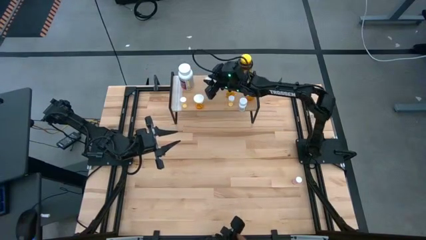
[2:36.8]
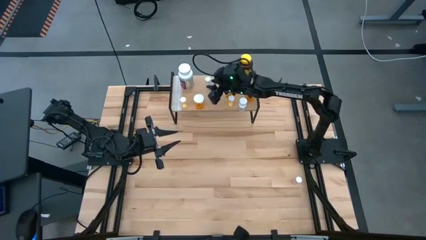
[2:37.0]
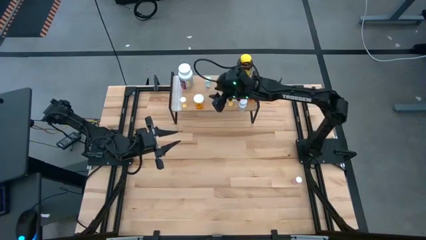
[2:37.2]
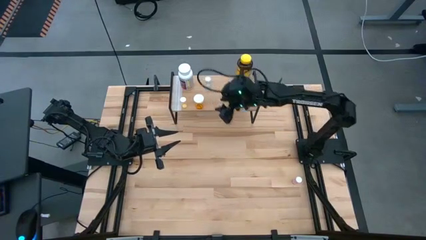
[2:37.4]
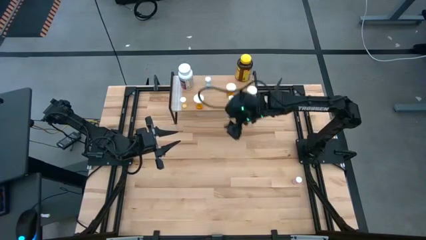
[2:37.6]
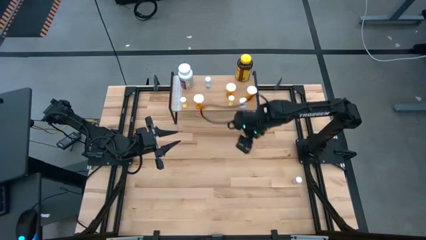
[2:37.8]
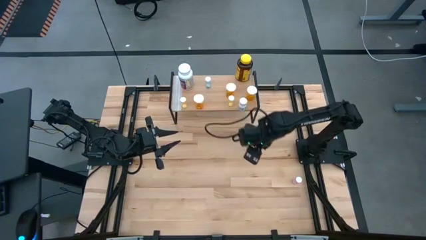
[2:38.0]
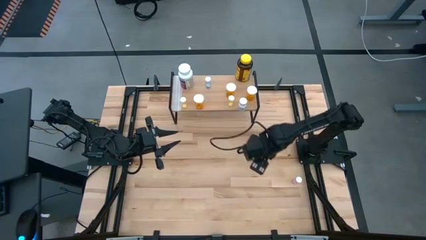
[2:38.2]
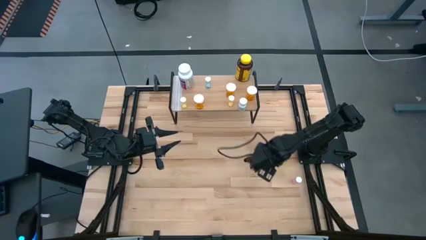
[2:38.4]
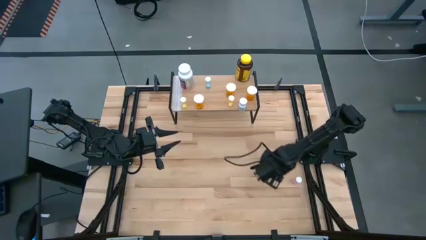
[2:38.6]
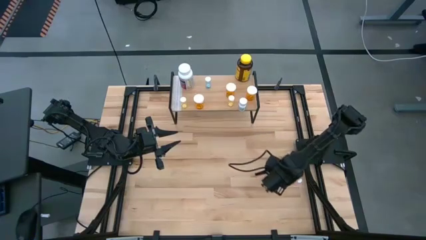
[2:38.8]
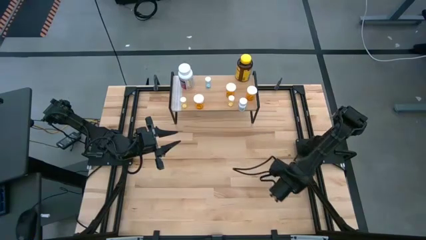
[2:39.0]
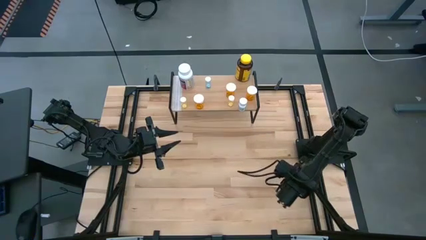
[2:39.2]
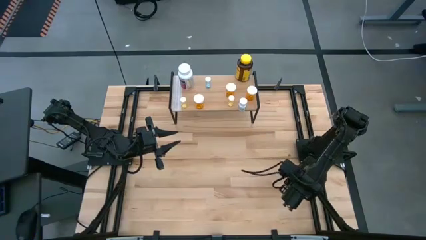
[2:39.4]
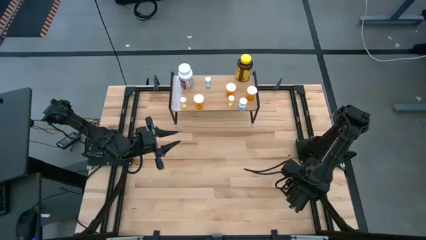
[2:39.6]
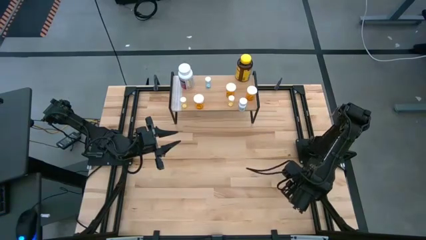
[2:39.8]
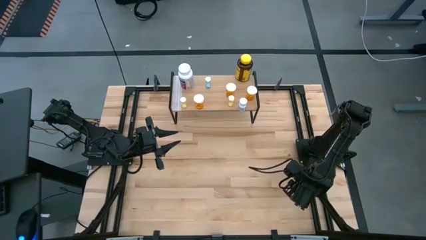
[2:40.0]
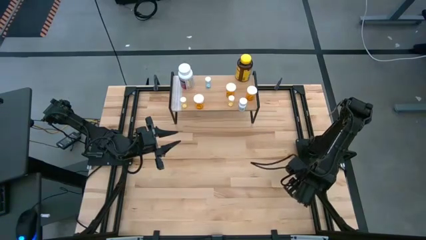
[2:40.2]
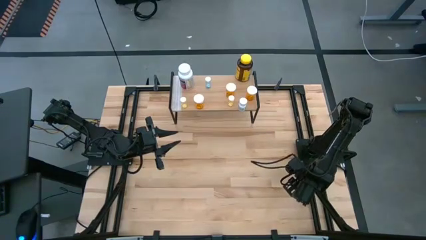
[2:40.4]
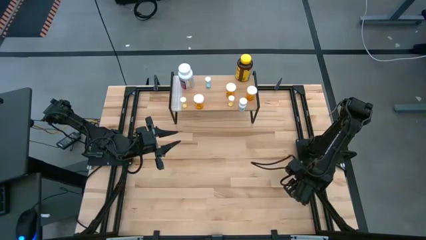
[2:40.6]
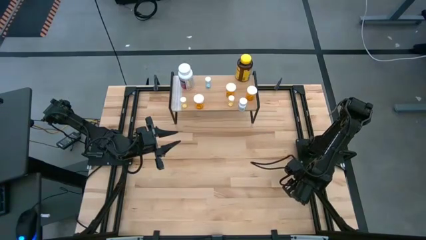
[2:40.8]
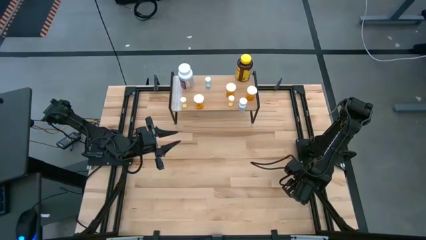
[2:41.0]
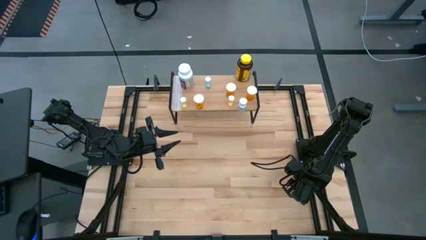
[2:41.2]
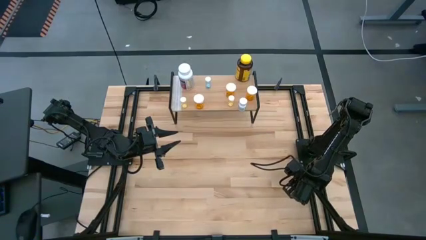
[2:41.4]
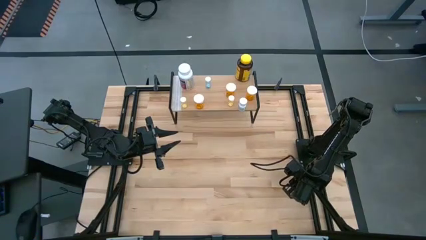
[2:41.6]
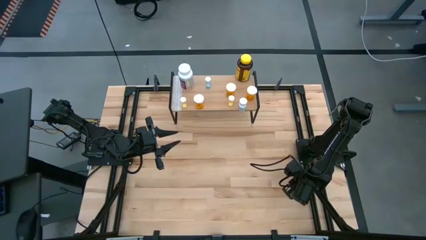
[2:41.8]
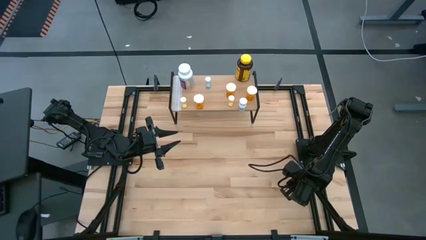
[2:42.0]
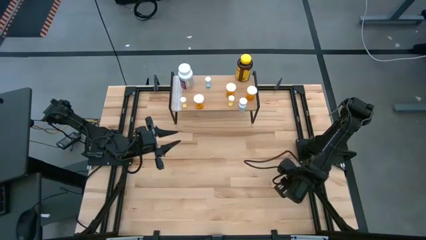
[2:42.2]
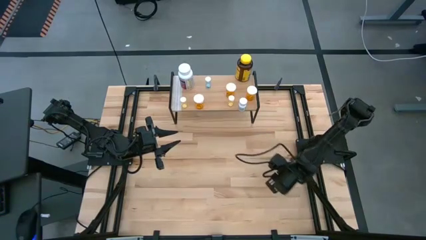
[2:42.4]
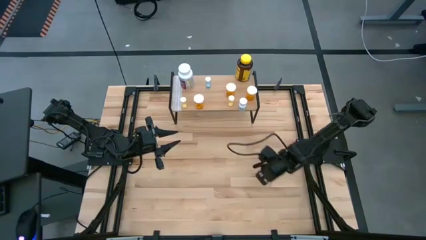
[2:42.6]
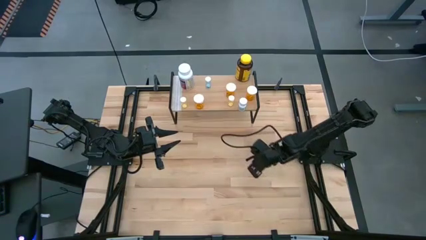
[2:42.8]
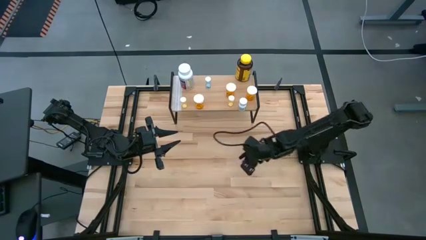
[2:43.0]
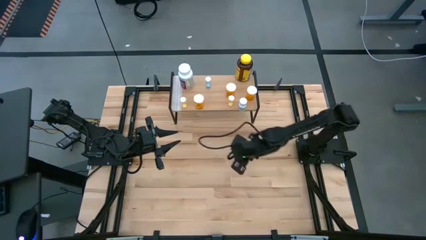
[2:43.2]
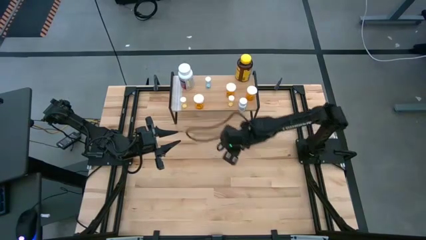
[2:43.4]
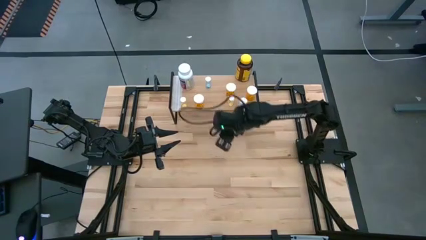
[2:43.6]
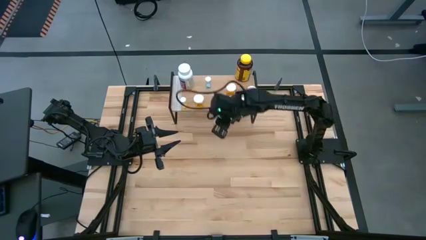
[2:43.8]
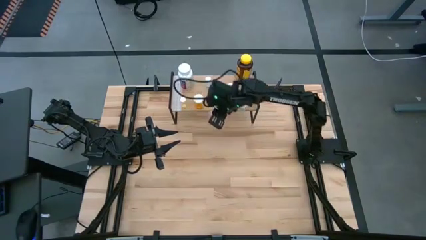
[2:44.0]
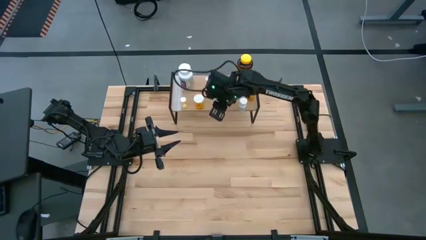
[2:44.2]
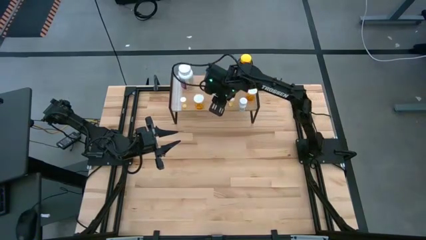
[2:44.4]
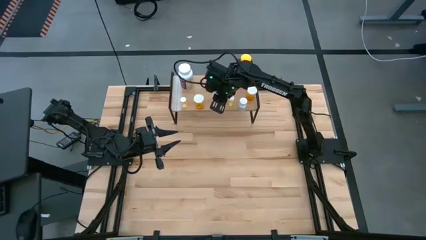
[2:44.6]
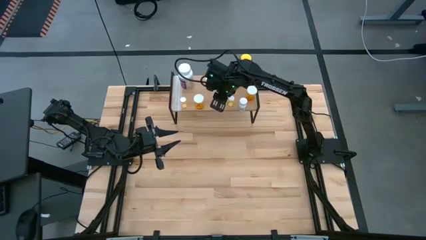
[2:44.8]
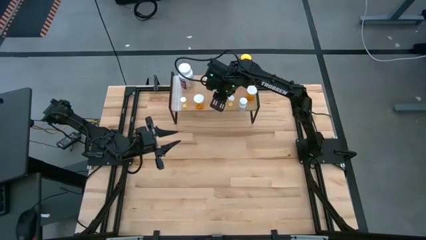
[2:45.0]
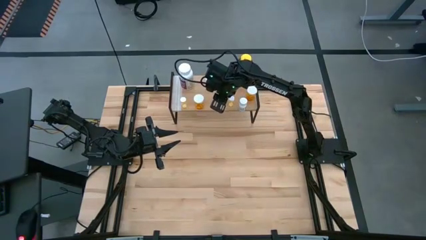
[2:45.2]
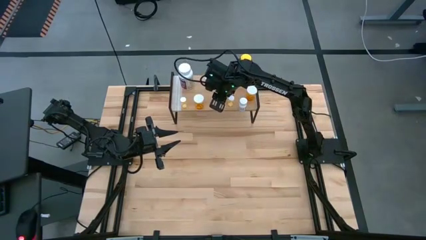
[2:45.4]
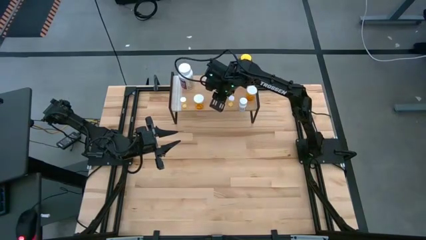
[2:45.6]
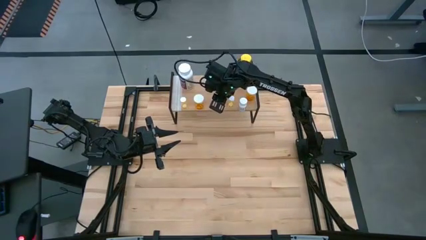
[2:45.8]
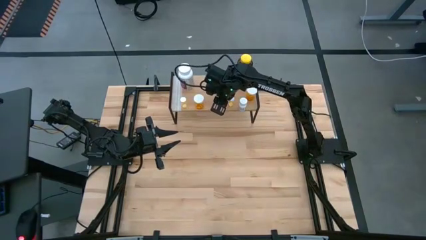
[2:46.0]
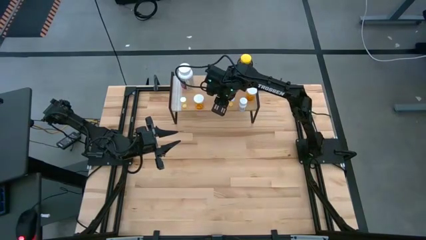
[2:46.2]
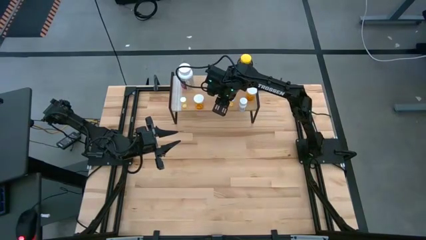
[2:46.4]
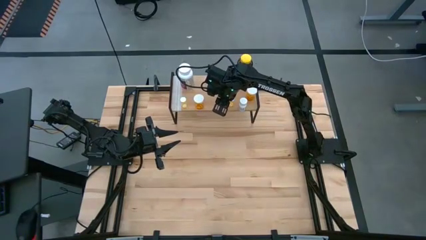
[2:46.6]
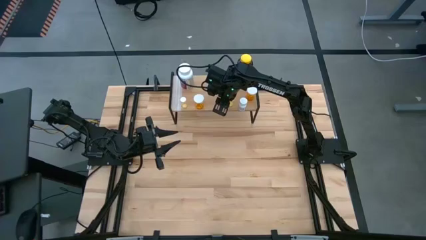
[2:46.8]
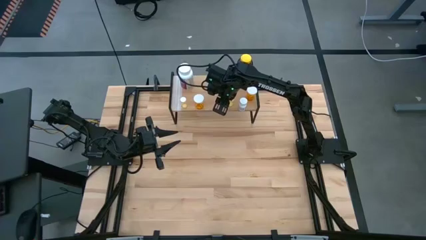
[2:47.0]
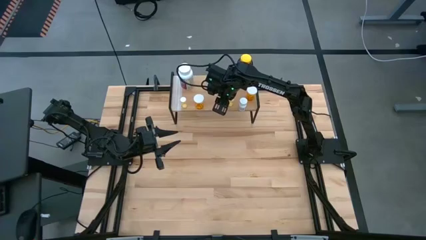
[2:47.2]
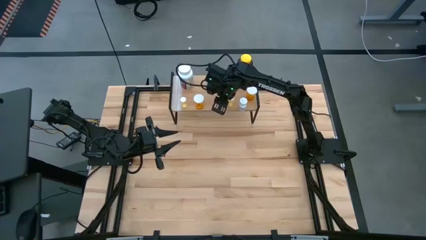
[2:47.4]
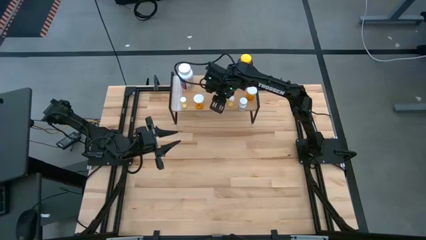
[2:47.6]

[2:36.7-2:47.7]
Task: Pick and place medicine bottles onto shelf by color
Put the small pink medicine bottle on the shelf

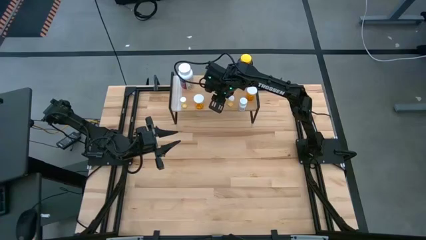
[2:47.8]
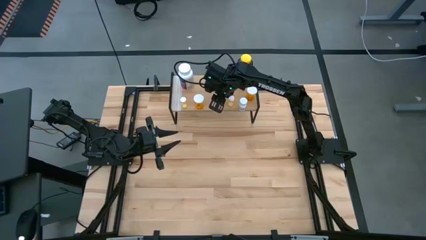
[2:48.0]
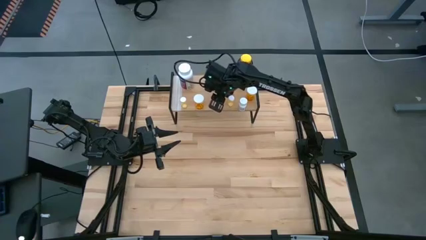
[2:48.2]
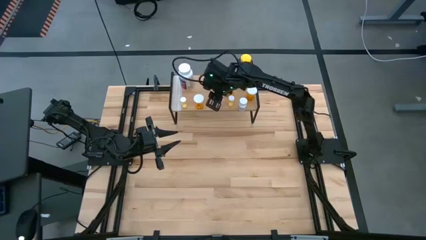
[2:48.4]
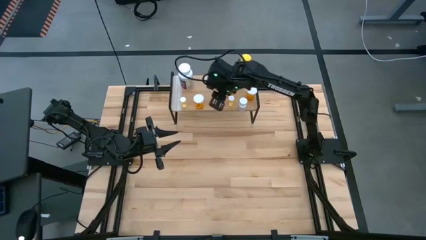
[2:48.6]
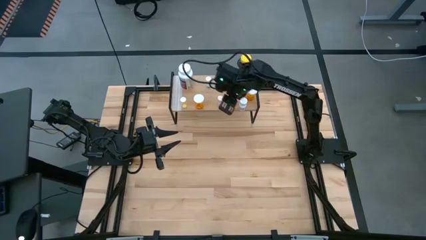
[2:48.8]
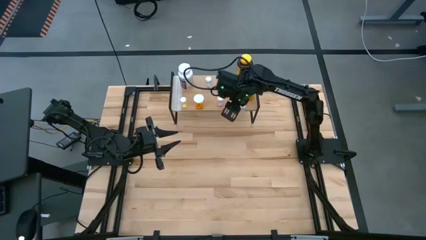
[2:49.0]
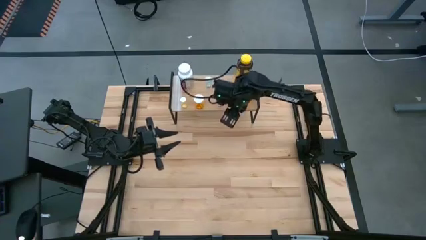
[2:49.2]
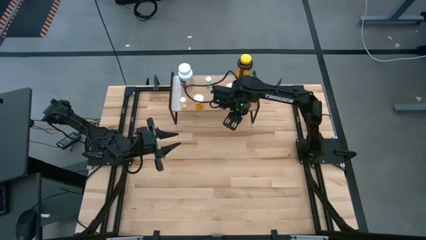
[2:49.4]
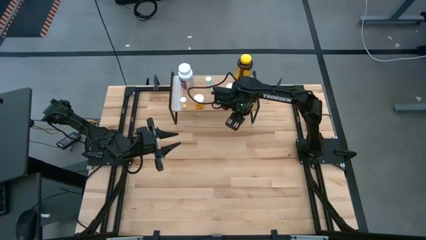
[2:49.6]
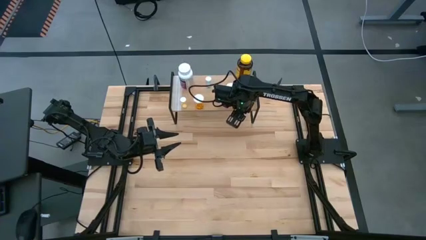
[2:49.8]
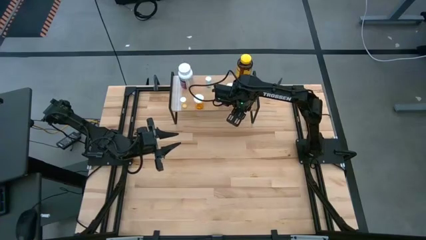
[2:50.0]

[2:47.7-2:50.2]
Adjust the small white medicine bottle on the shelf

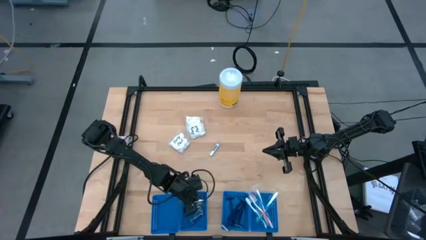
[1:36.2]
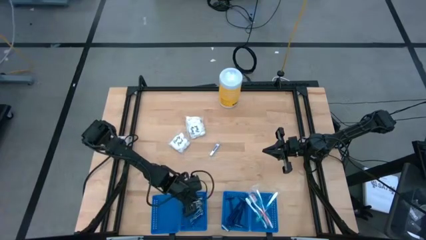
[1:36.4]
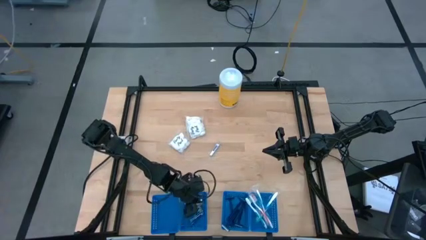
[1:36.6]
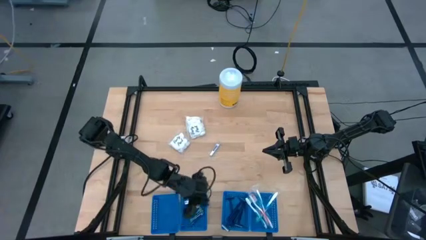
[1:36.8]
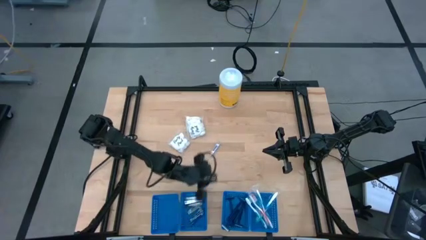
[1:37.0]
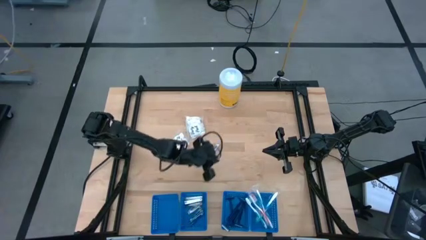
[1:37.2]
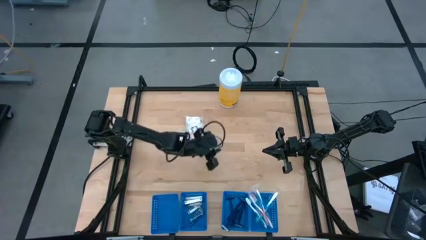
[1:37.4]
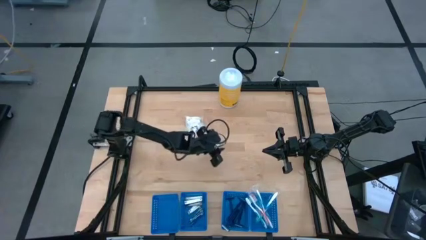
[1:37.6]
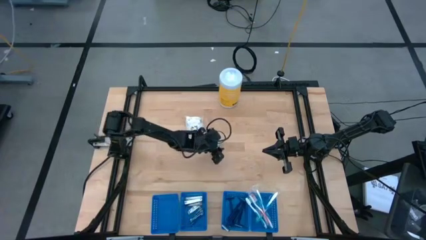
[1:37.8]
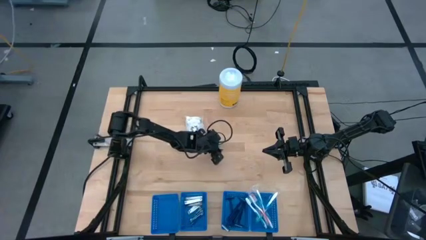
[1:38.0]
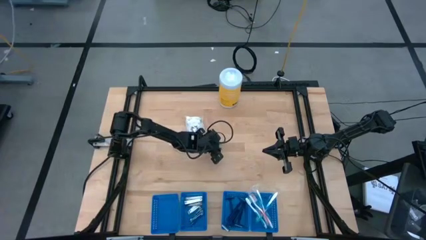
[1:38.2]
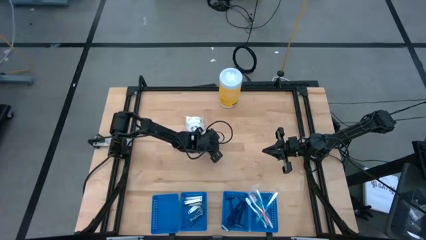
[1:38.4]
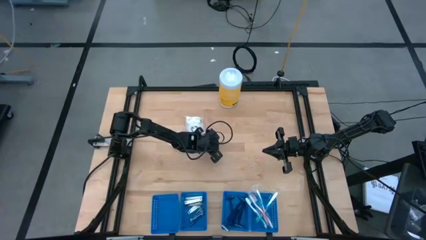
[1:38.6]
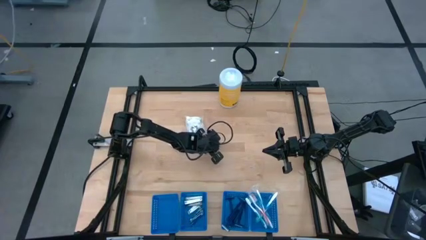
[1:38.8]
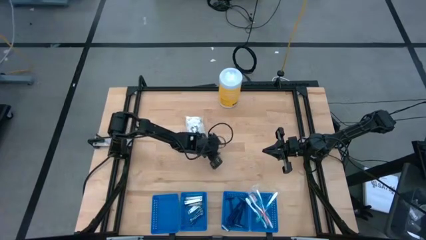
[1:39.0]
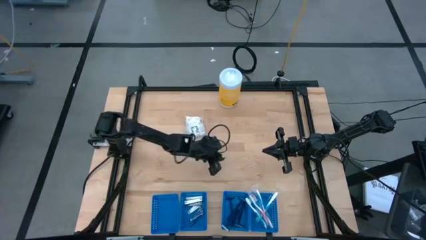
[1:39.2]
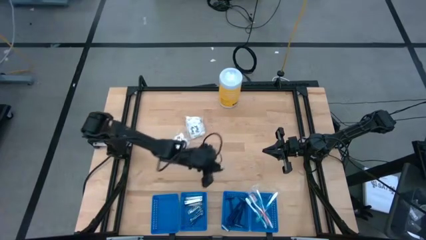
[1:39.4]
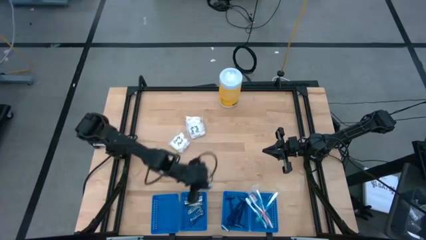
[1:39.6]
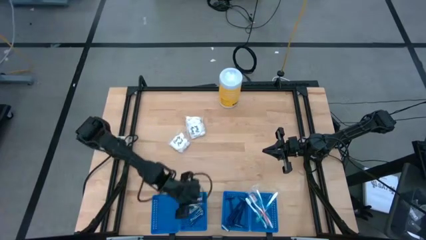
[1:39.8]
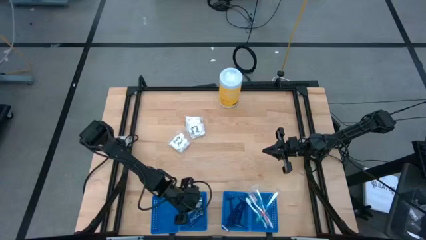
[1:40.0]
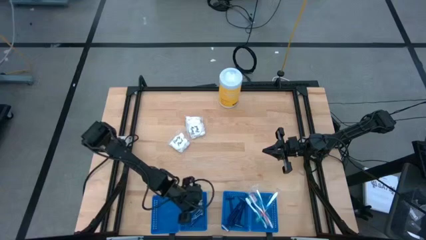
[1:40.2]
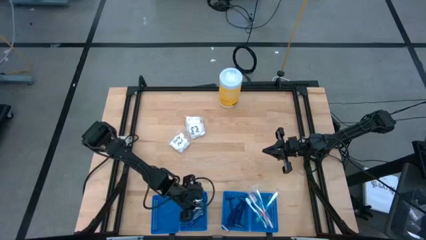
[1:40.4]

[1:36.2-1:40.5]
Task: Pick & Place Travel size toiletries
Put the silver nail cutter into the blue basket
